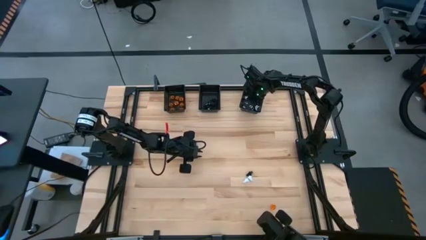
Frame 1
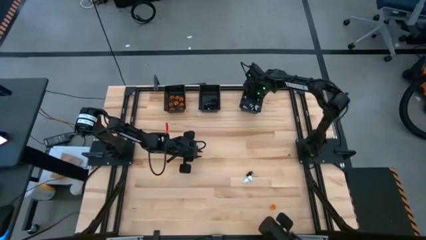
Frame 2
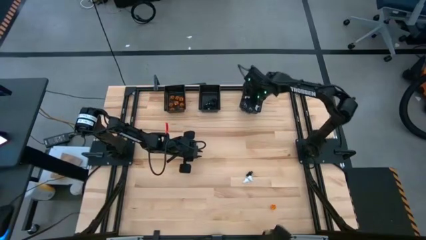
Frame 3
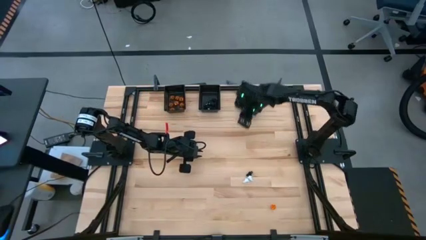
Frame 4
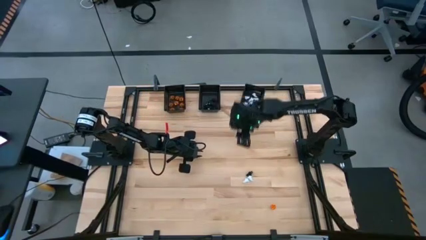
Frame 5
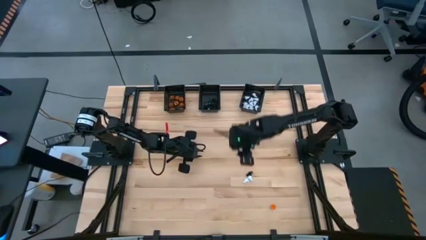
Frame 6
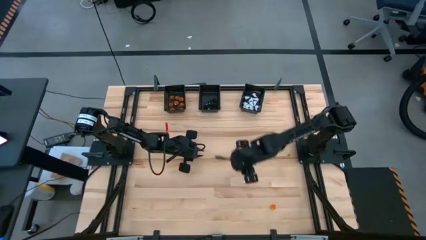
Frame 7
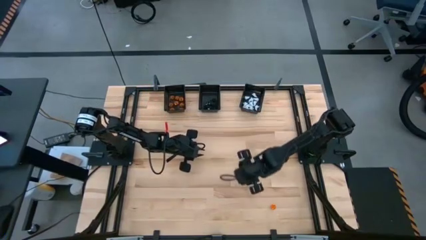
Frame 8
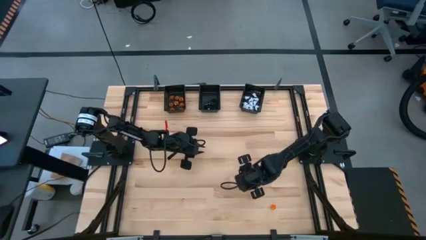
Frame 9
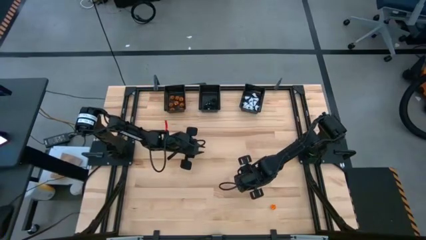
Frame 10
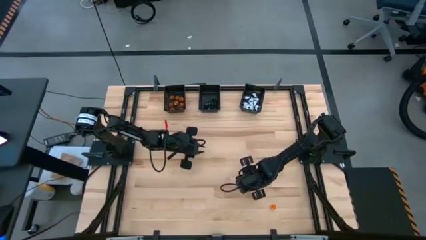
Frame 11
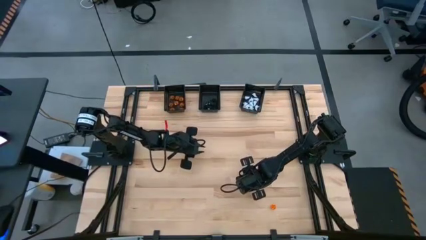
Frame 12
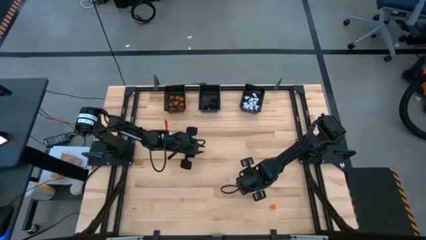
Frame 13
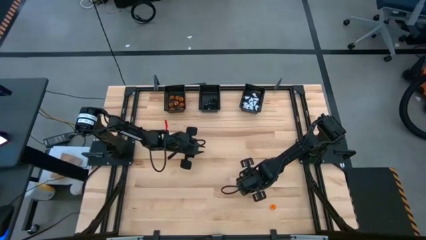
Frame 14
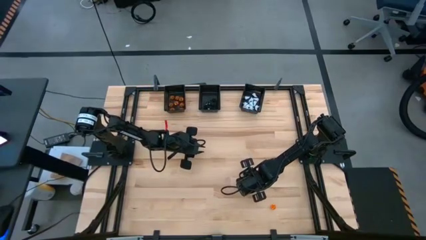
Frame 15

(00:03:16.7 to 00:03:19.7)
Task: Sort Halloween decoration
Put the white ghost toy into the right black basket

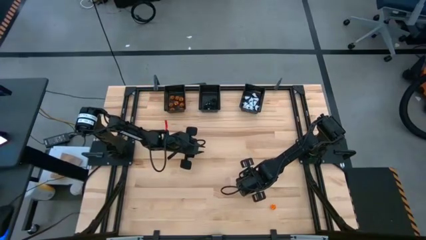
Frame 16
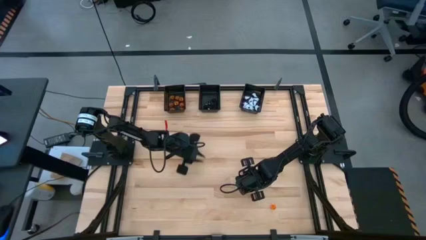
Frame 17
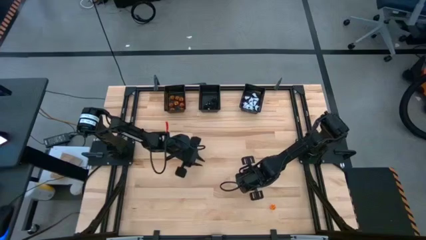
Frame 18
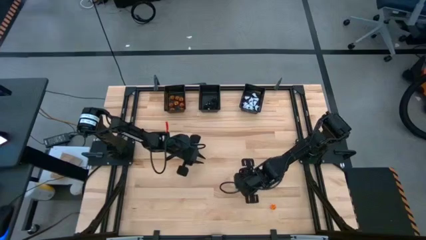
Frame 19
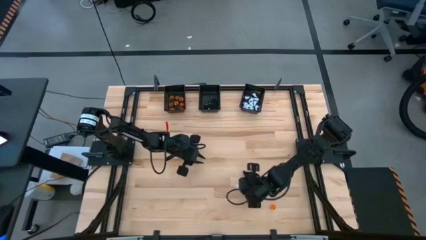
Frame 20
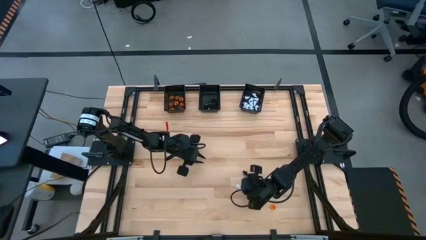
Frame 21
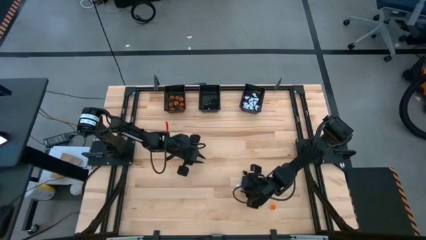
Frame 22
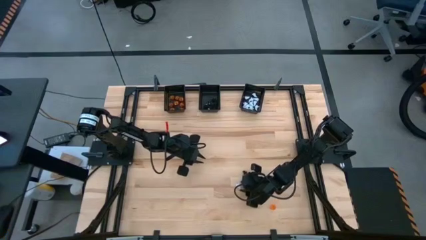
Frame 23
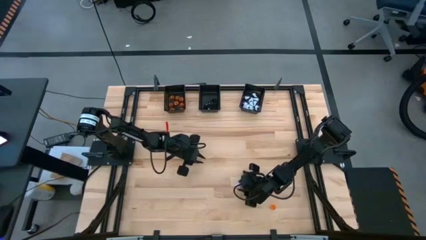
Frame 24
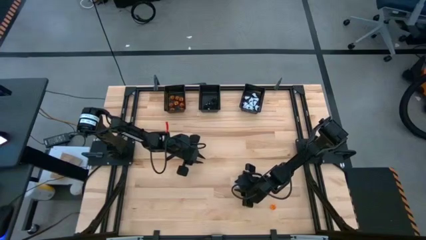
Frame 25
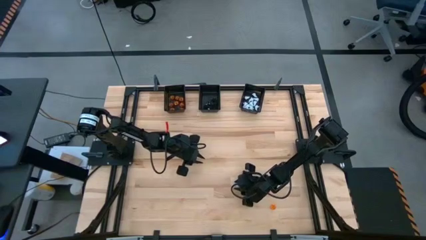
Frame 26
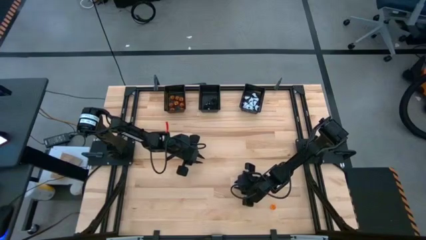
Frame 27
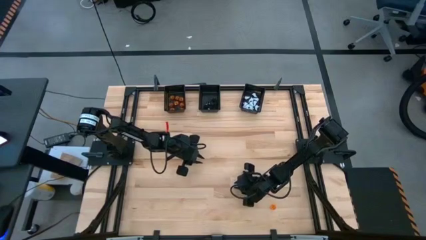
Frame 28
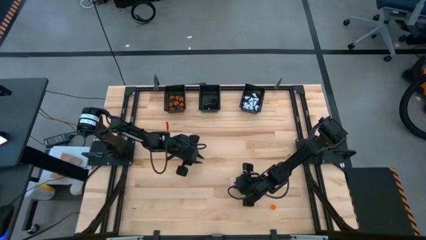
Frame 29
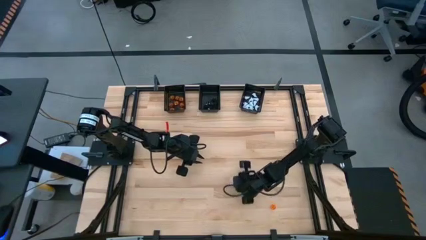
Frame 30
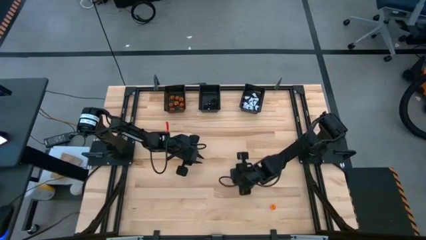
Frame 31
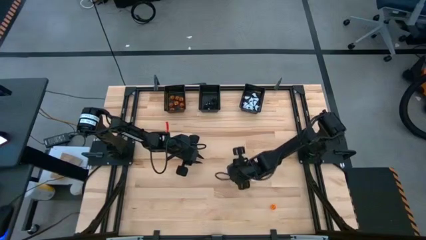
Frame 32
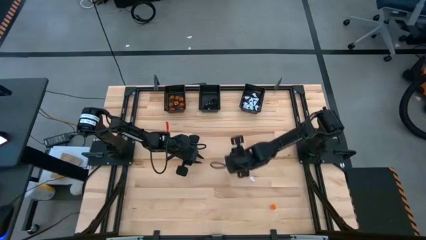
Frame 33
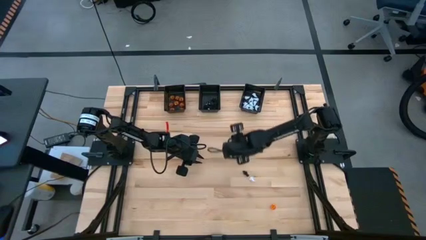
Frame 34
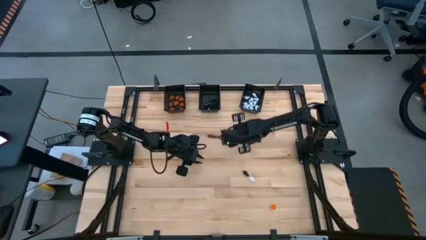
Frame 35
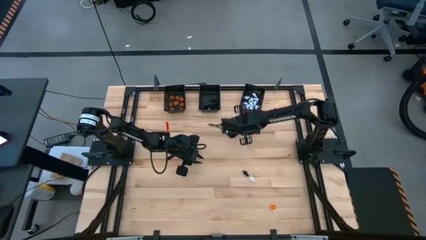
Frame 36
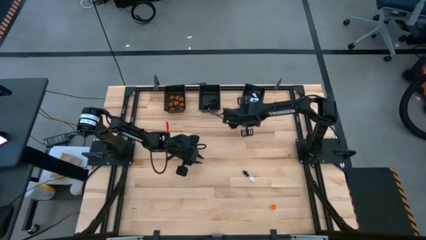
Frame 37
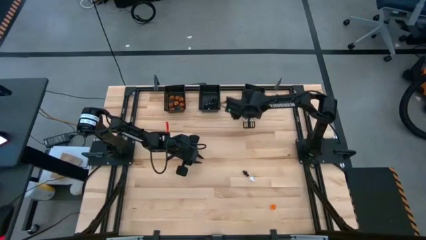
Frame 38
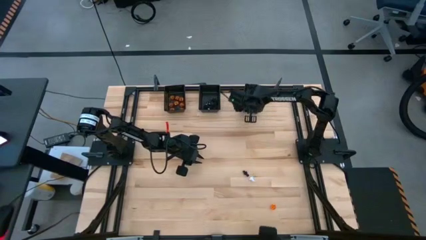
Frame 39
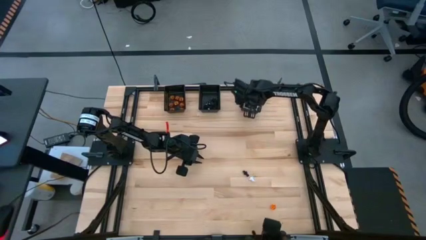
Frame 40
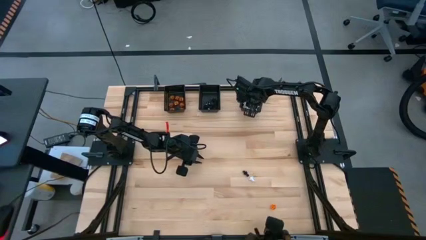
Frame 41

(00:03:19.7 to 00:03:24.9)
Put the white ghost toy into the right black basket

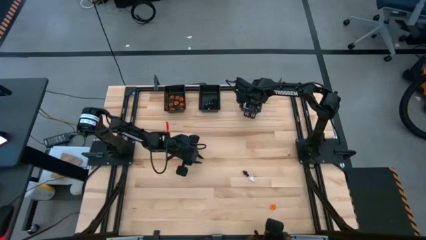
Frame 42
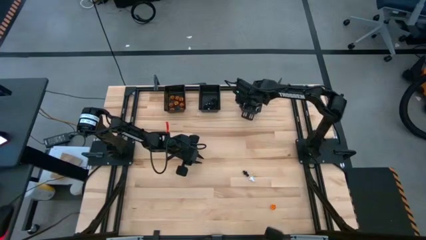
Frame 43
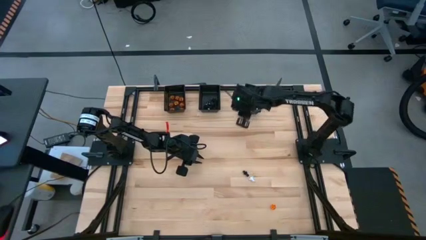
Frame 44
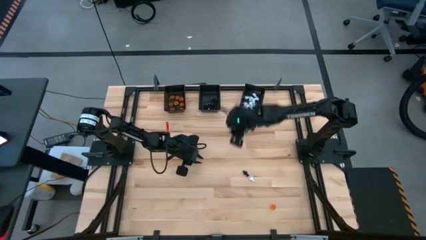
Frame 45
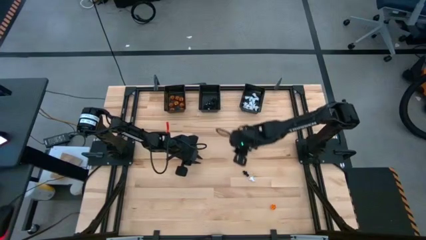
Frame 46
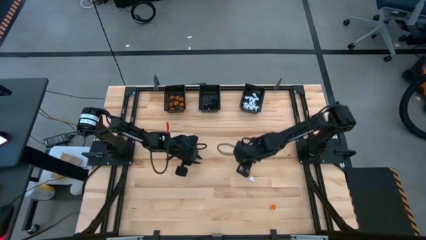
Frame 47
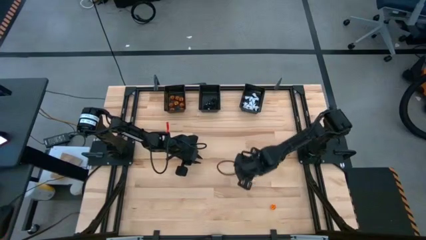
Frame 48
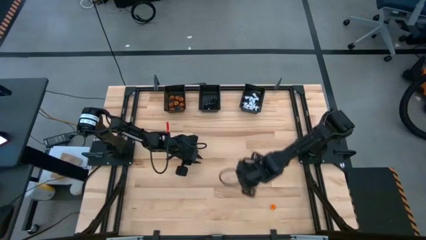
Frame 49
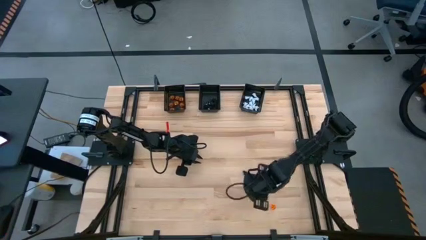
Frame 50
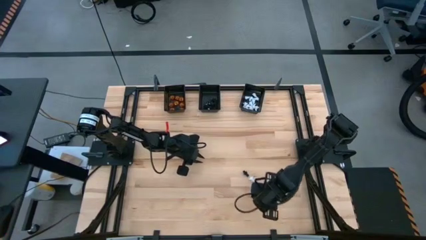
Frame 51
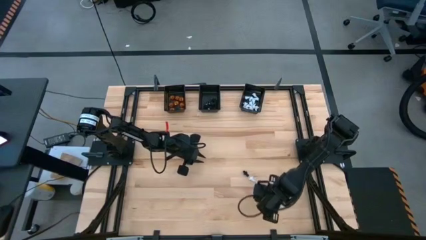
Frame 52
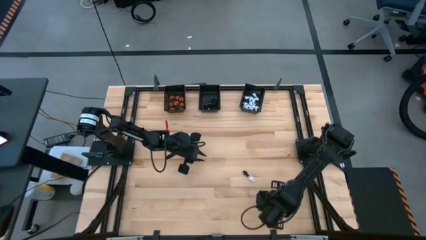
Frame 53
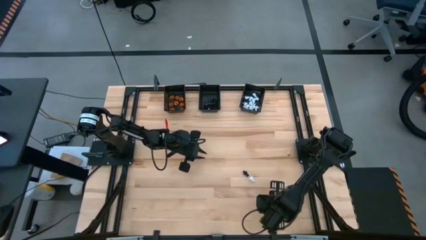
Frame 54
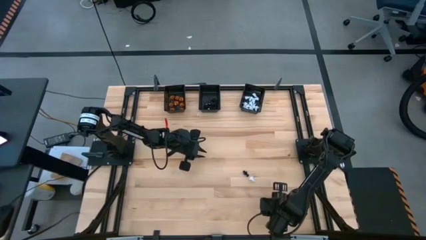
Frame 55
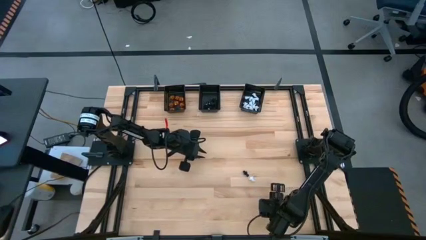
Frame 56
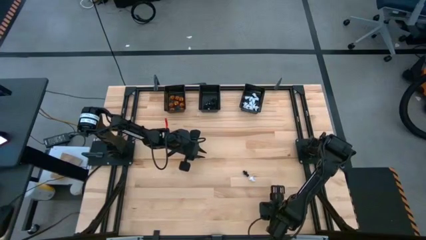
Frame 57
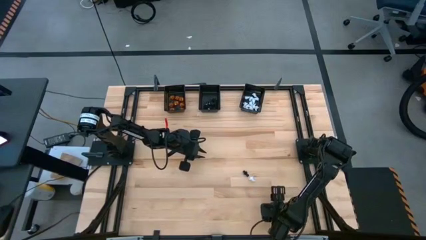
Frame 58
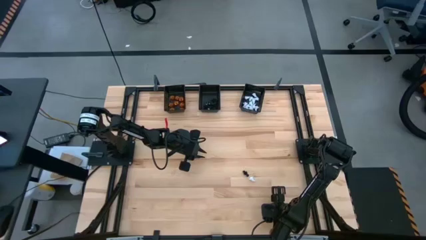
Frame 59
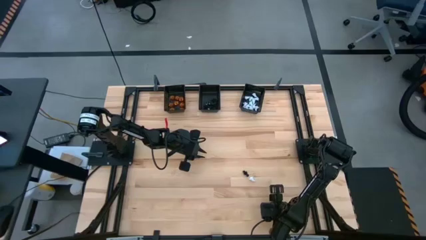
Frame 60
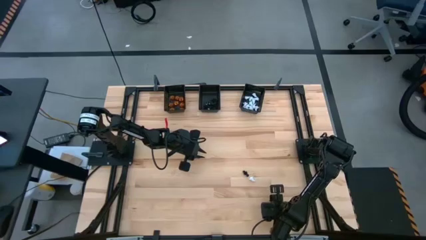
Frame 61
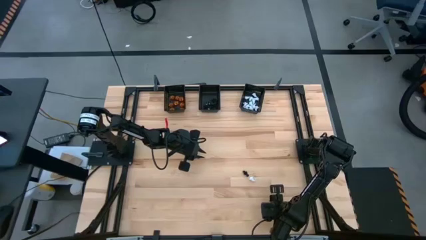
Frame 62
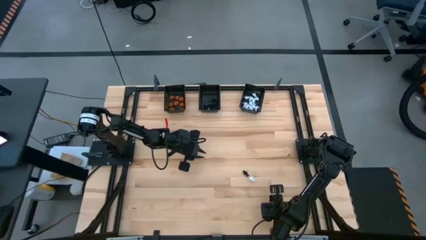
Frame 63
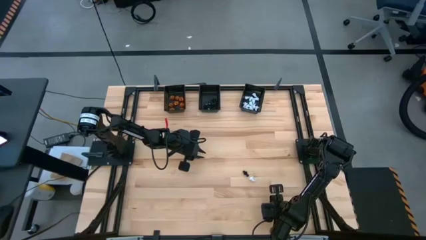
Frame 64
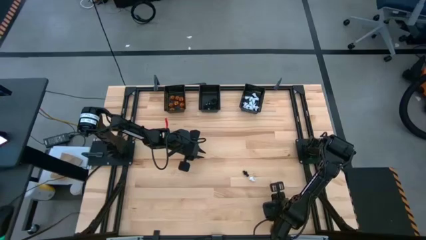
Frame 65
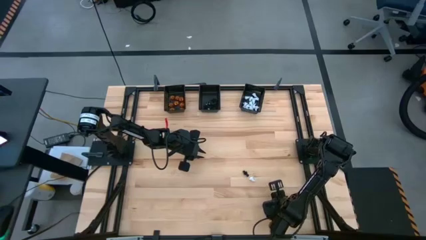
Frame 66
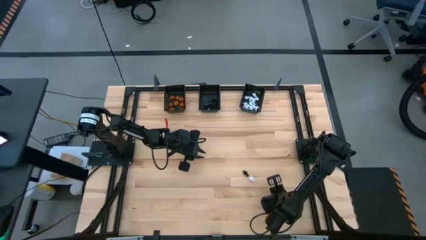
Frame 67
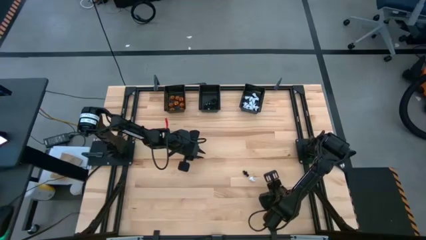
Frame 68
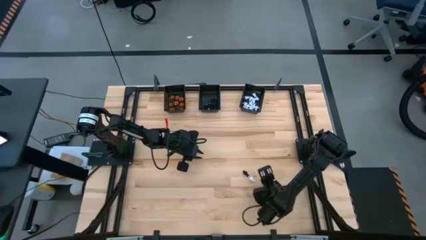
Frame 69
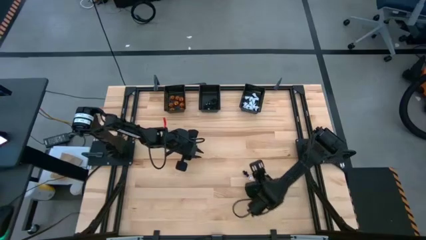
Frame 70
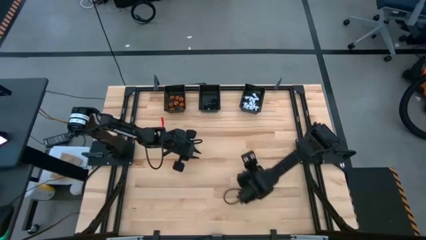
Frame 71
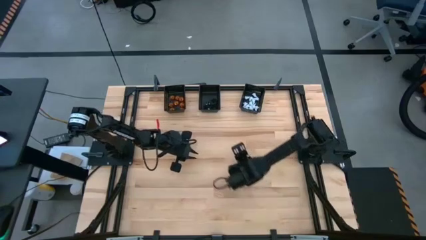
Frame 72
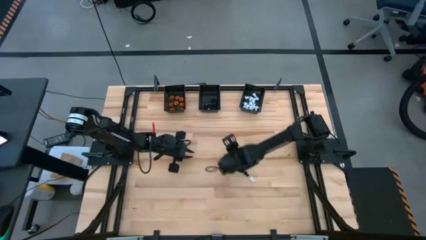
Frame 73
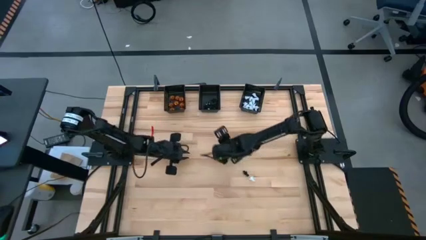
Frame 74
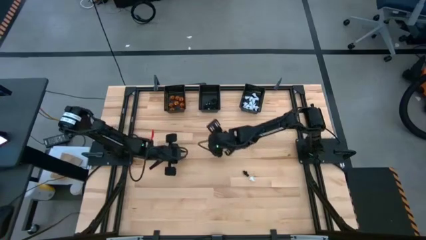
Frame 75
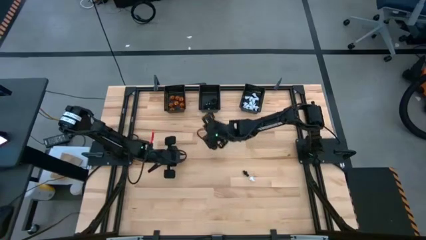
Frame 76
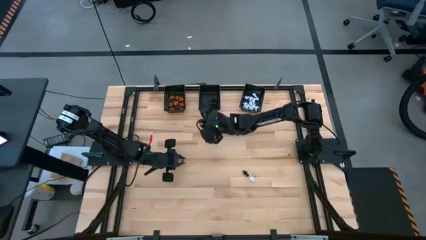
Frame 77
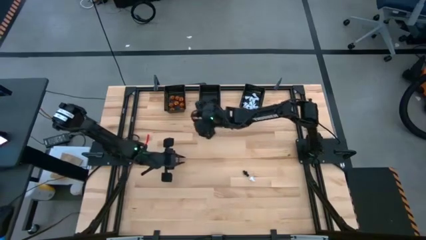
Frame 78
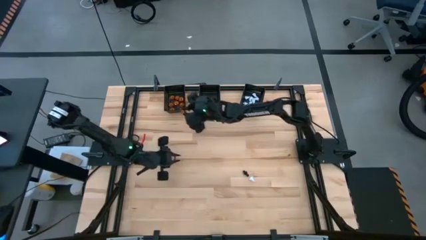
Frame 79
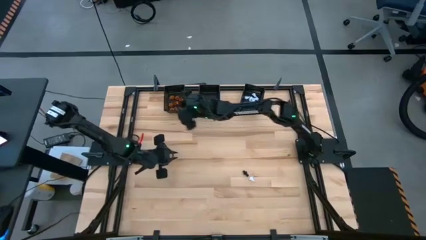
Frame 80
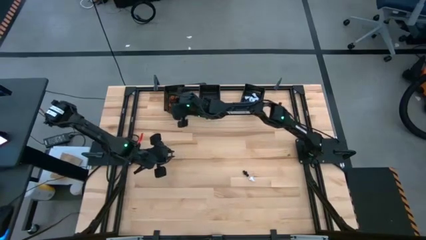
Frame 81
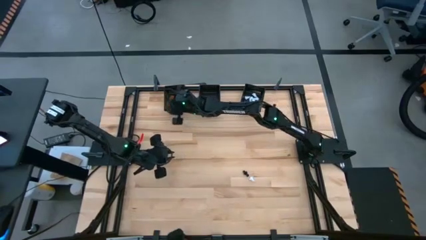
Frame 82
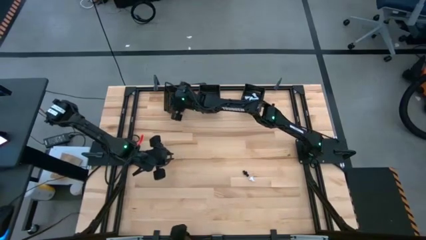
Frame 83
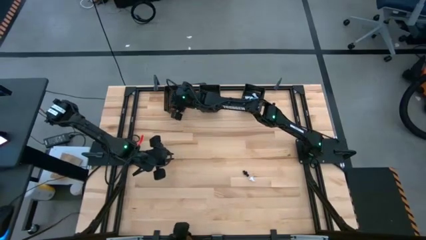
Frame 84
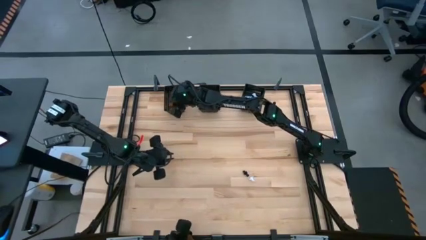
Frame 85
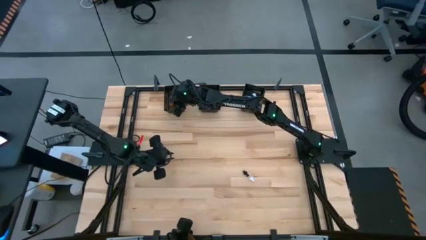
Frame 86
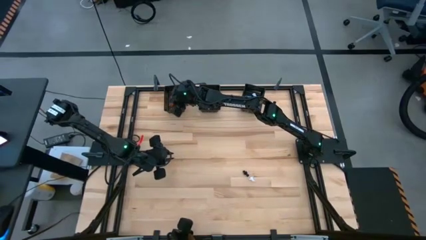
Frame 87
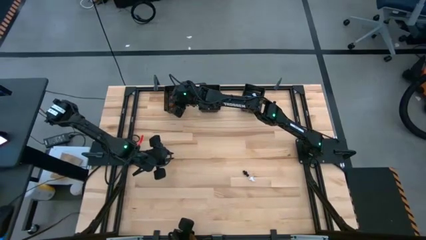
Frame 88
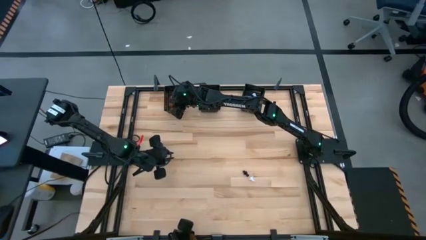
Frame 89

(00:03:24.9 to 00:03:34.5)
Put the orange pumpkin toy into the left black basket
